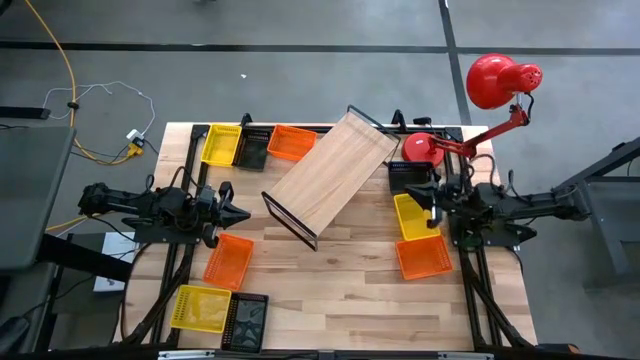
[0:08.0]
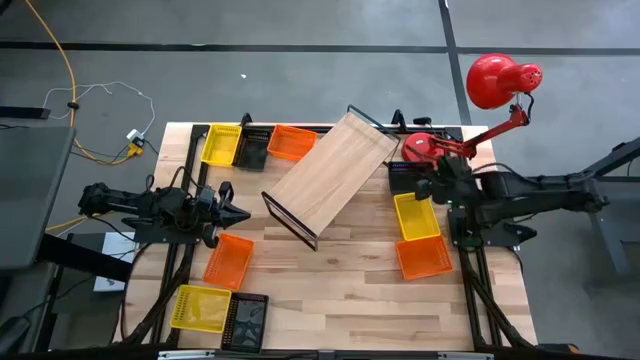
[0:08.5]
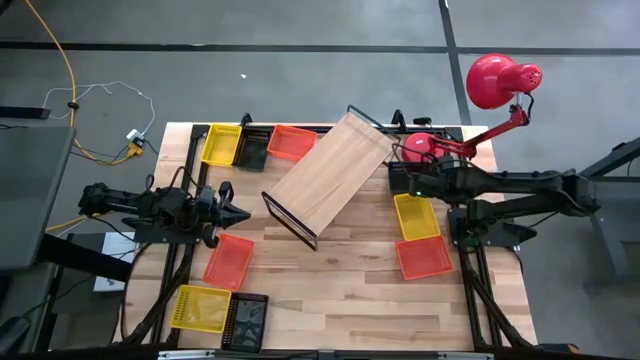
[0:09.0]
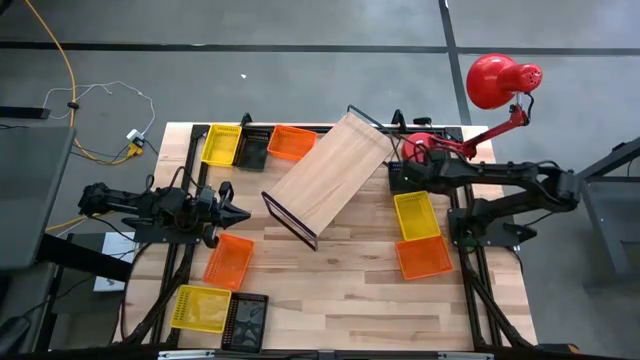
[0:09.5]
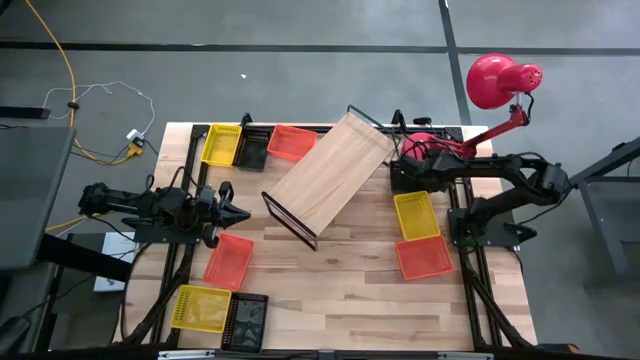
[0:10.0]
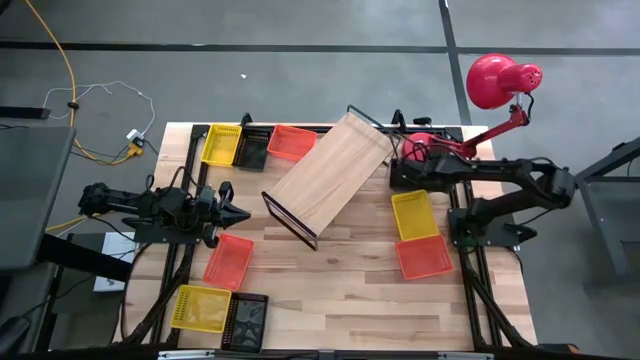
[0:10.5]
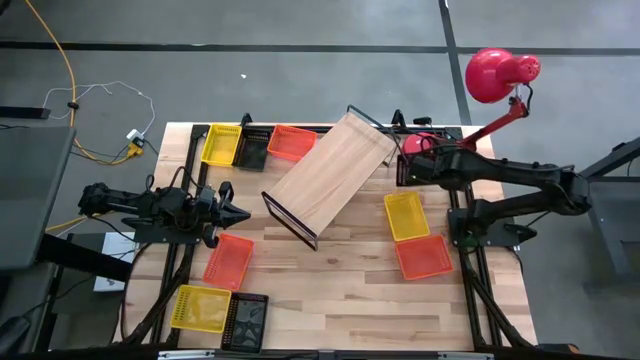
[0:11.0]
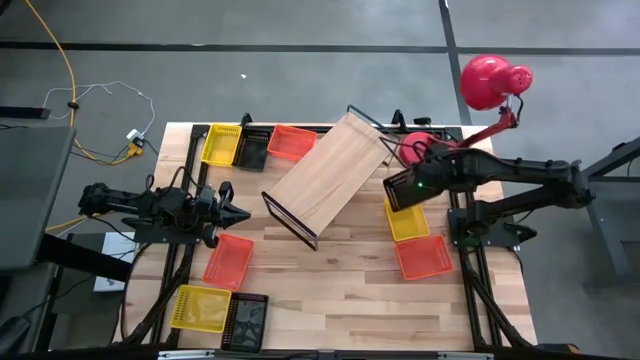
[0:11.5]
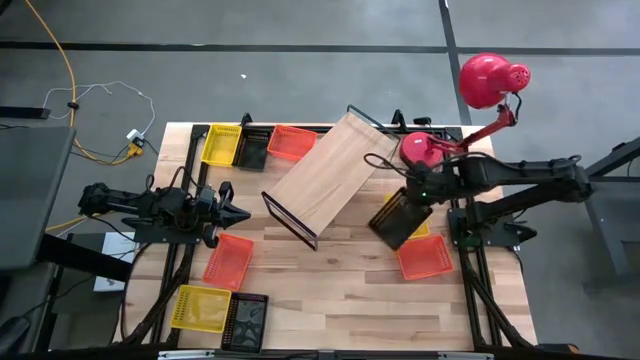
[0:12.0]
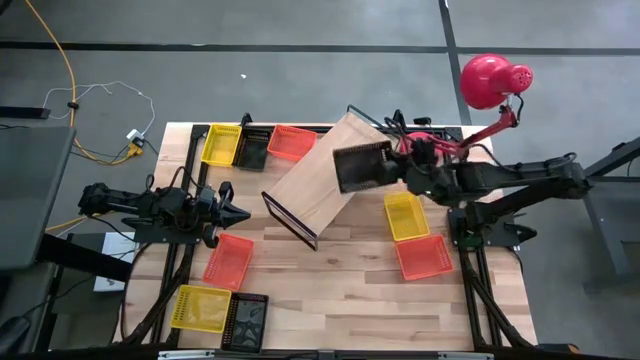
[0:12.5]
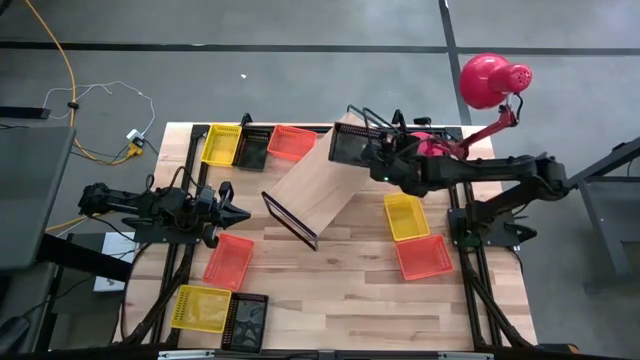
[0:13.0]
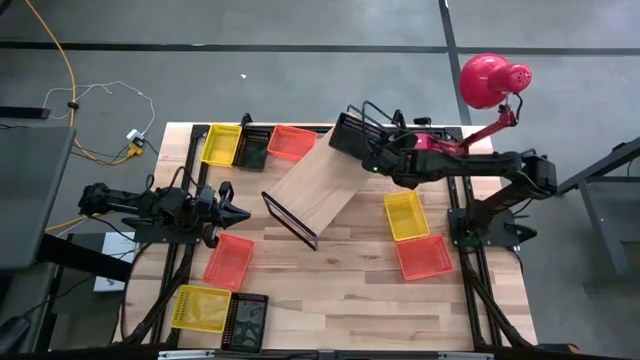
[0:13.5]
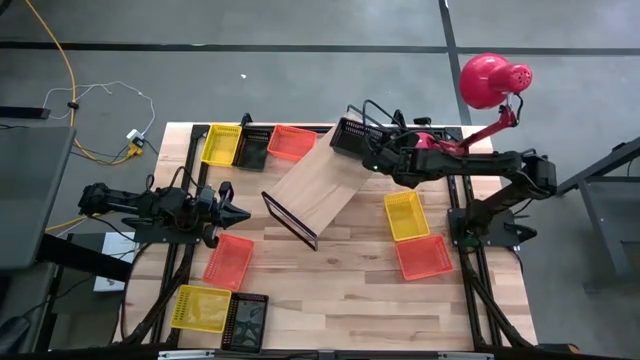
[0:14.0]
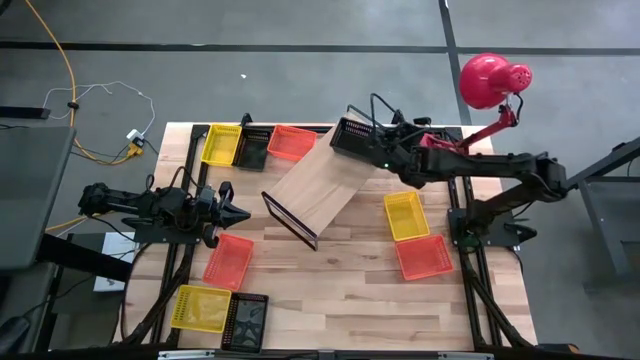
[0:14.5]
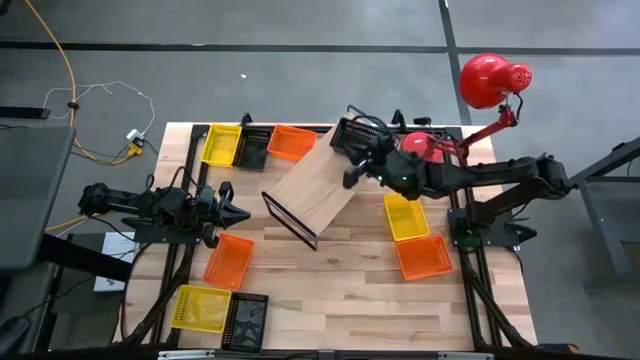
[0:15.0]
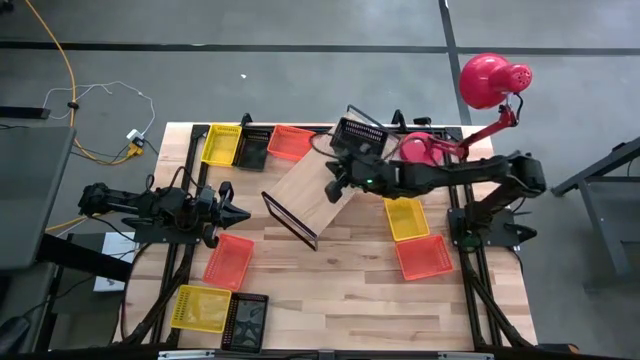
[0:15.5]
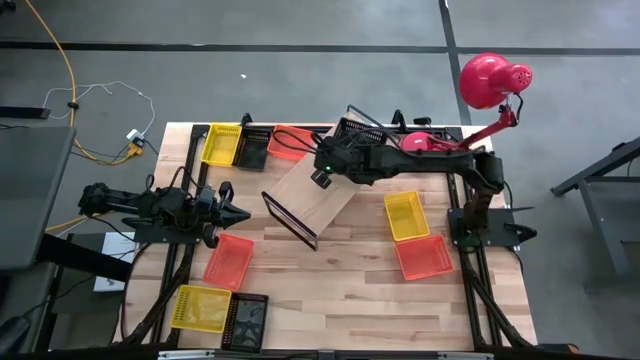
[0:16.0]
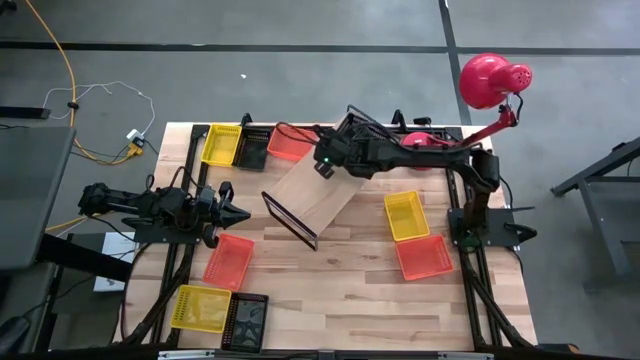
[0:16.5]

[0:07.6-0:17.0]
Task: Stack baskets on shelf by color
Put the top right black basket on the shelf

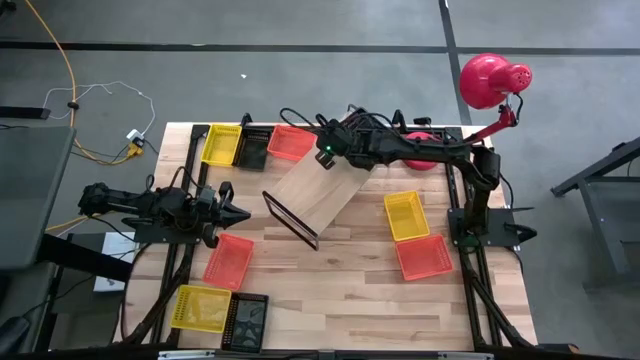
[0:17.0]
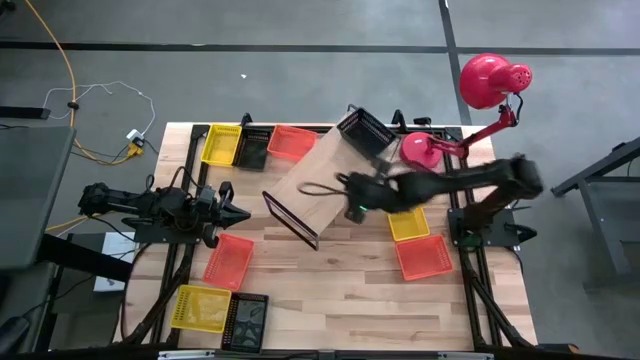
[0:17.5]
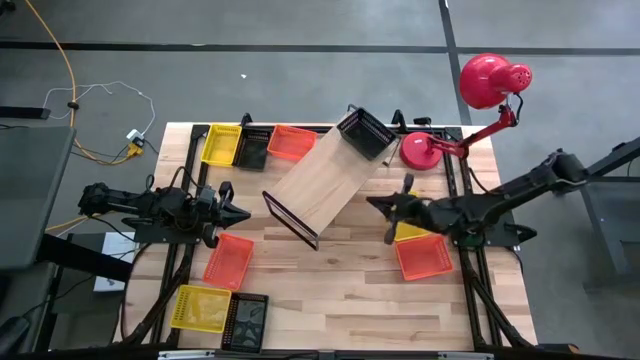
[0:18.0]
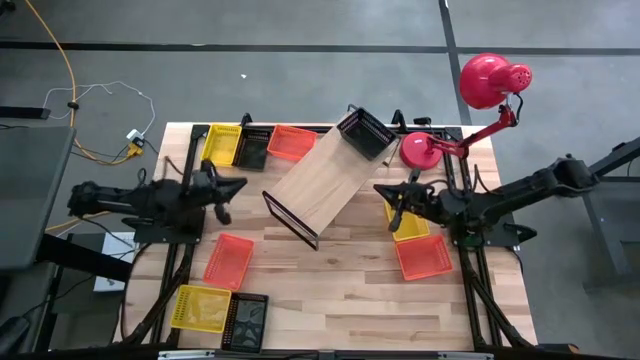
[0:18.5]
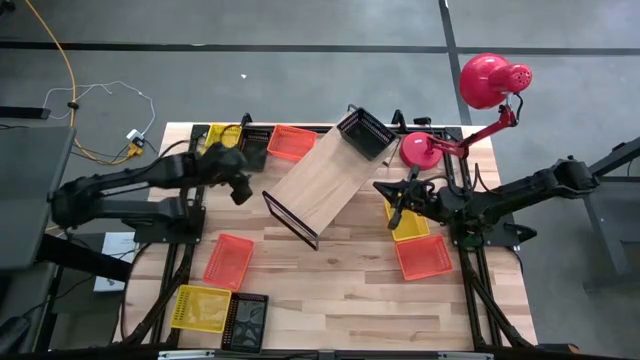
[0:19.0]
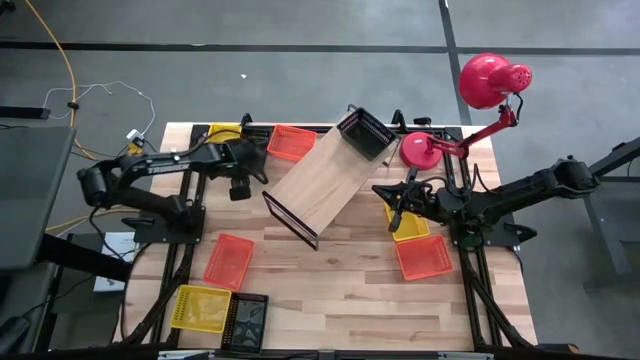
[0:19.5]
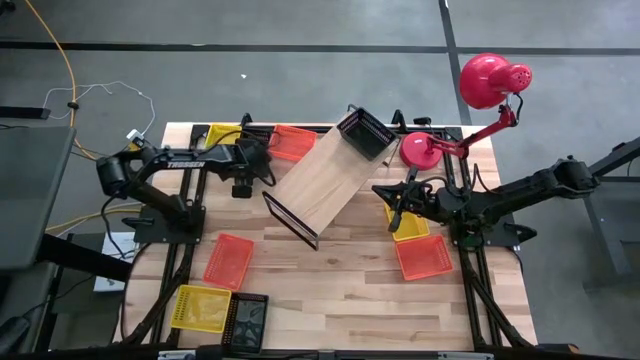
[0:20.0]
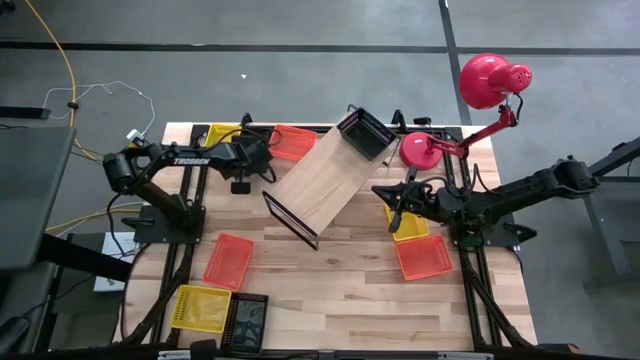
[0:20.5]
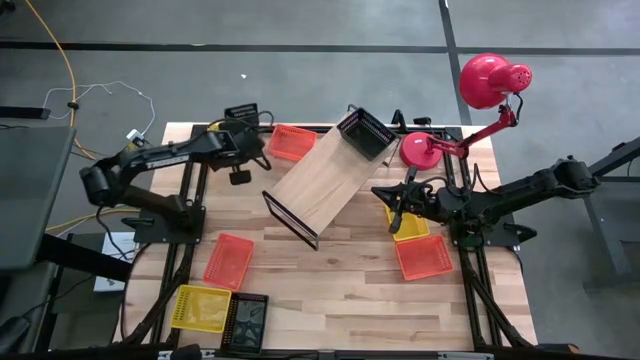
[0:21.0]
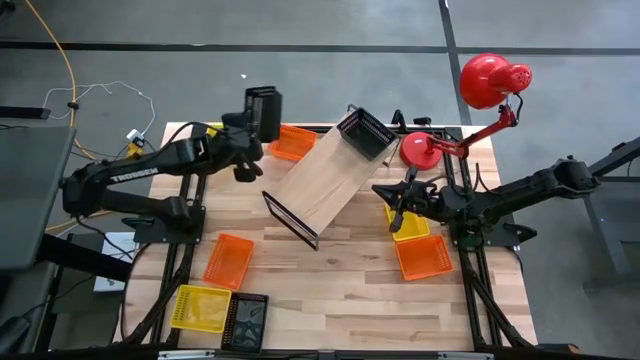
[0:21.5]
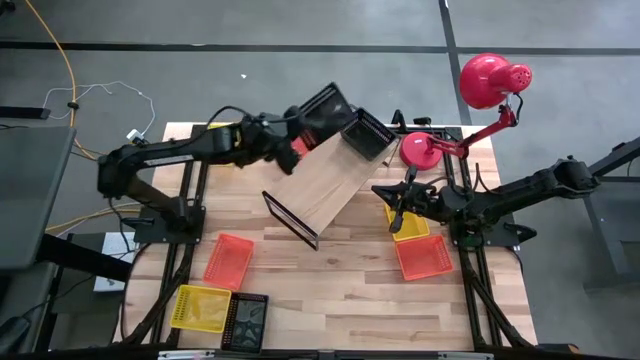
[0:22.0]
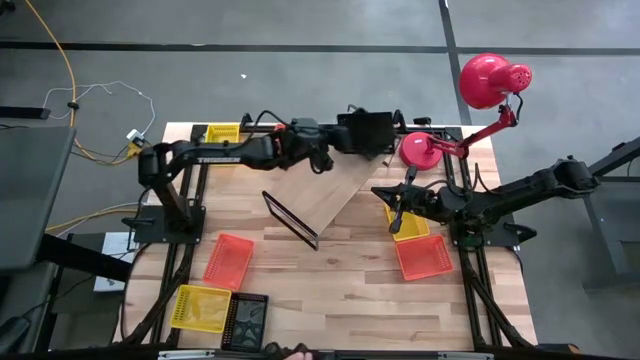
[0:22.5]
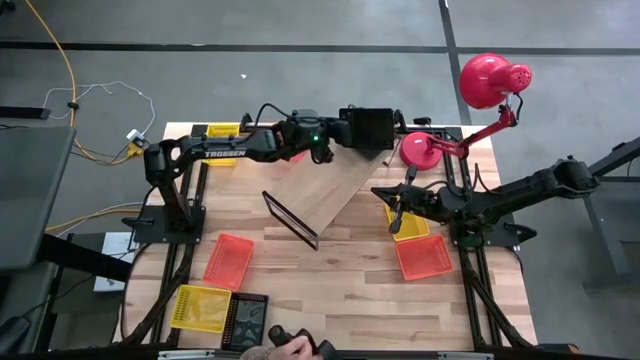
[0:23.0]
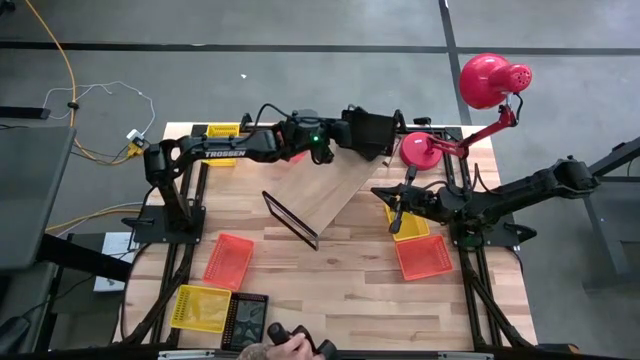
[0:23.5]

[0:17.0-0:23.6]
Stack the top black basket on top of the black basket on the shelf

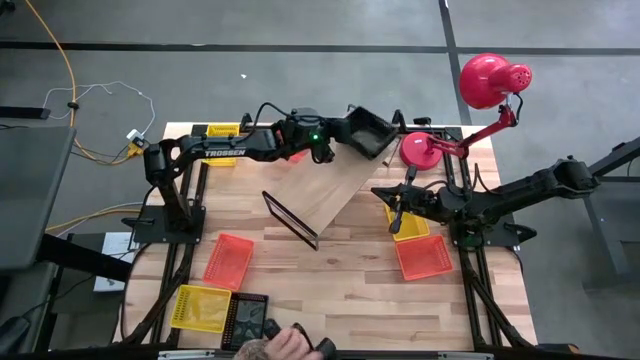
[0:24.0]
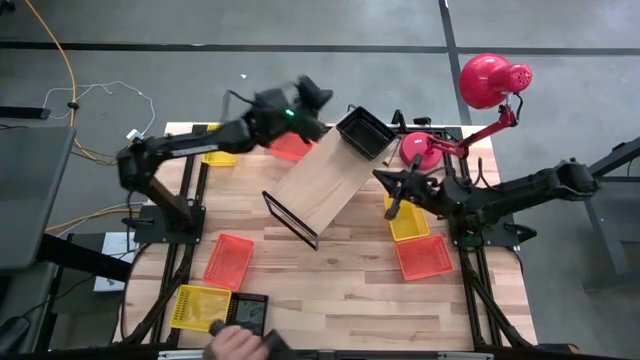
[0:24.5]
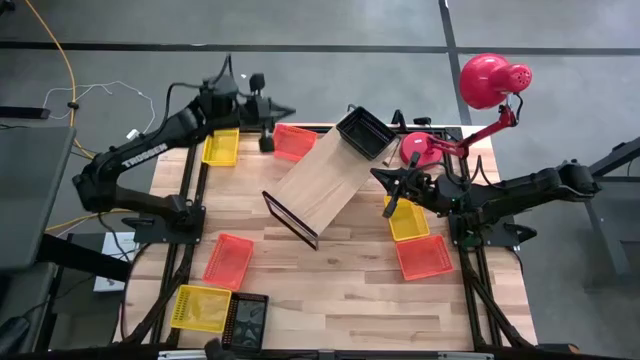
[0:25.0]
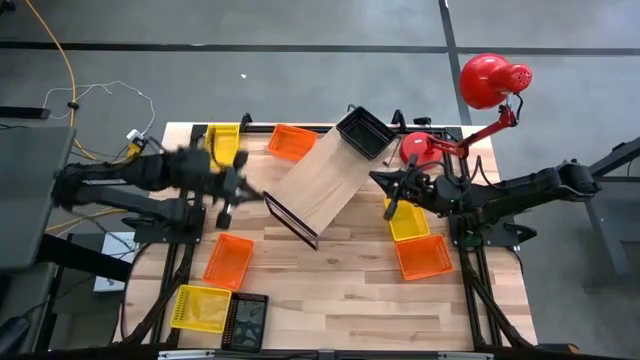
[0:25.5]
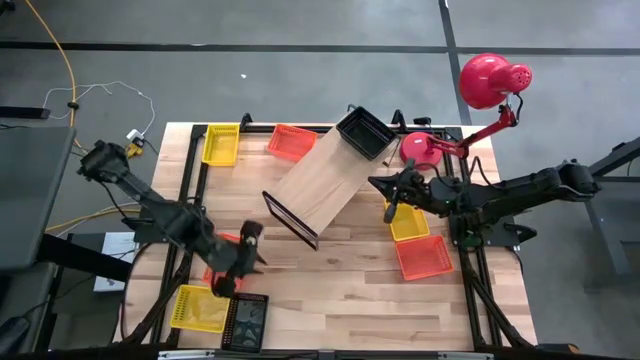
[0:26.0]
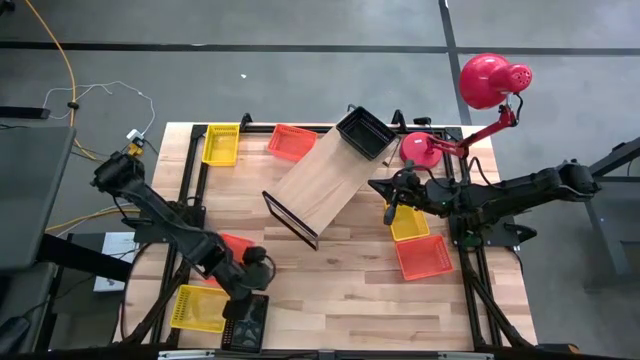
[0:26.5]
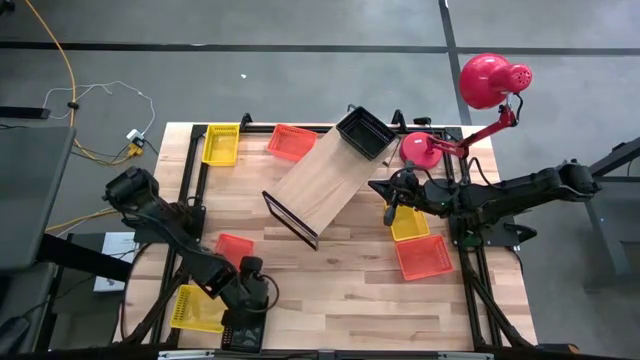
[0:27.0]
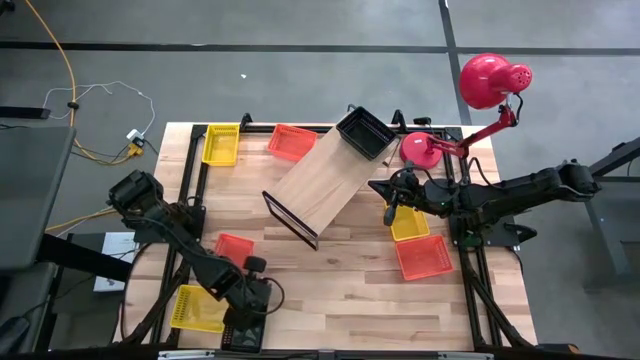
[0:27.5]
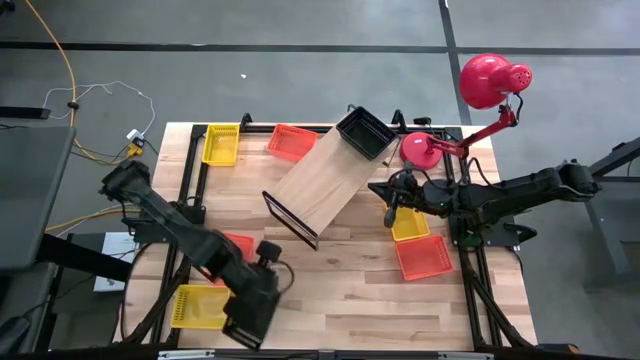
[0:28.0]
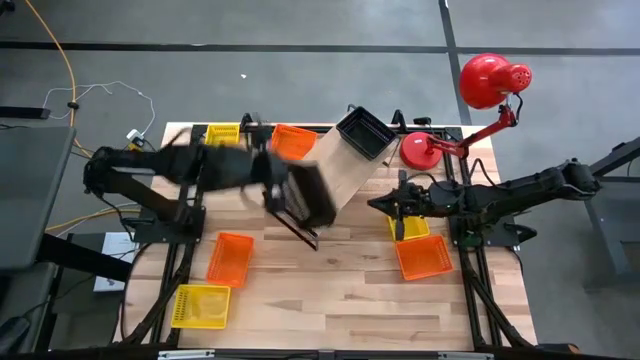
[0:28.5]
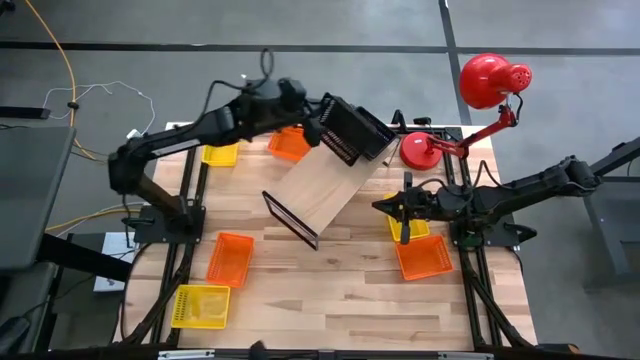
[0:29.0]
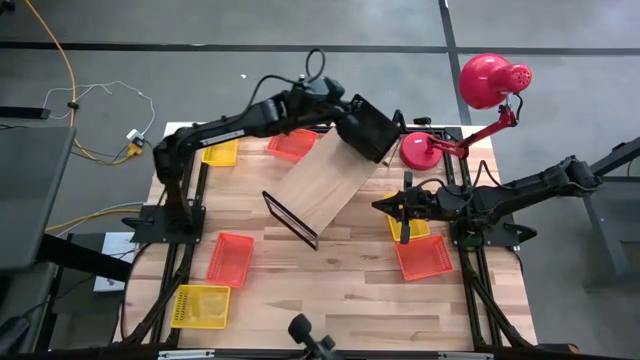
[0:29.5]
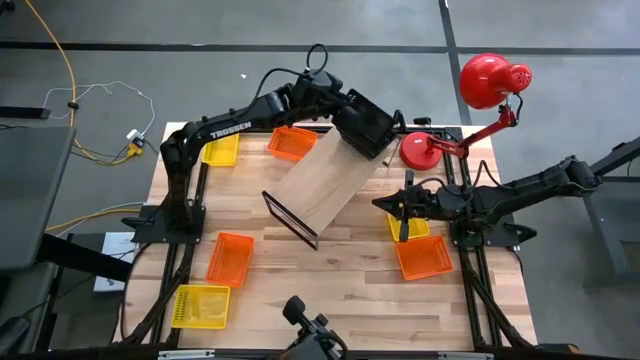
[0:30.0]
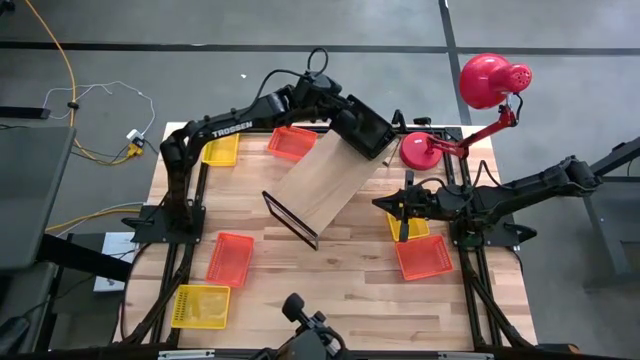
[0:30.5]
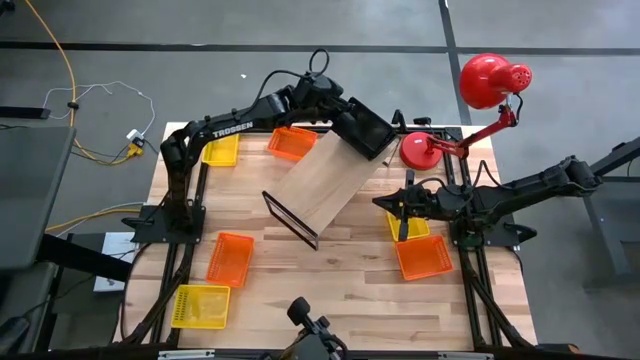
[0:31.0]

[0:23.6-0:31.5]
Stack the black basket on top of the black baskets on the shelf
